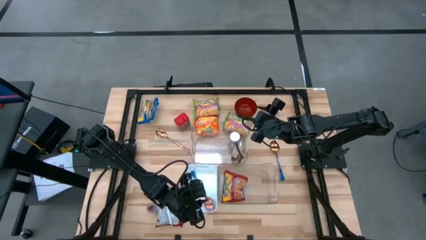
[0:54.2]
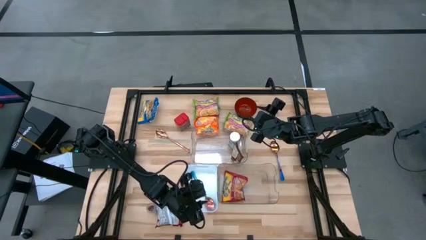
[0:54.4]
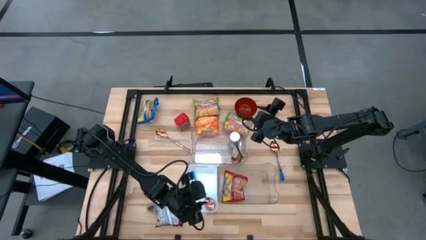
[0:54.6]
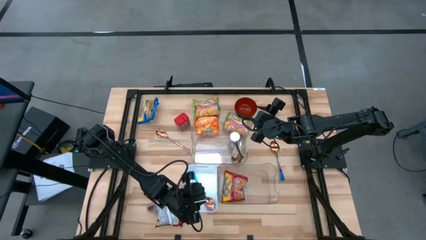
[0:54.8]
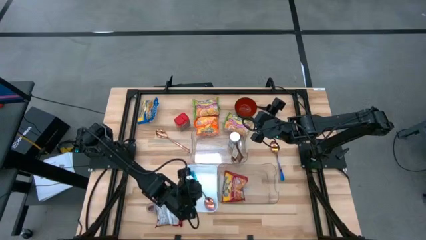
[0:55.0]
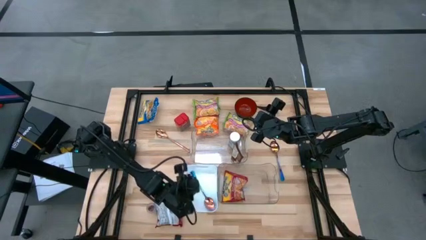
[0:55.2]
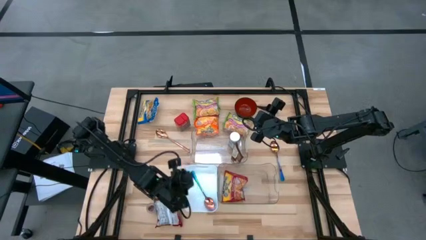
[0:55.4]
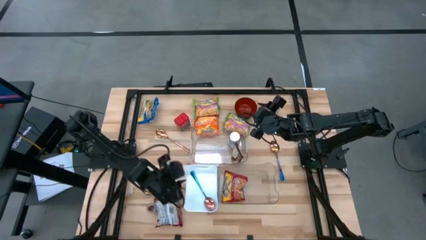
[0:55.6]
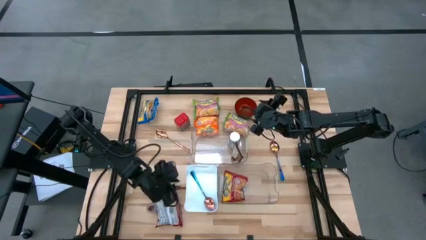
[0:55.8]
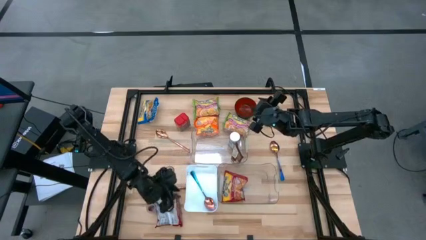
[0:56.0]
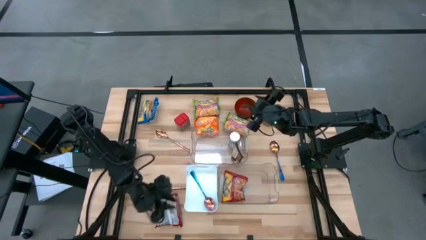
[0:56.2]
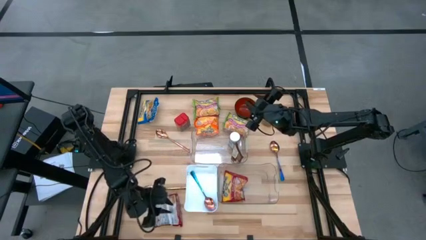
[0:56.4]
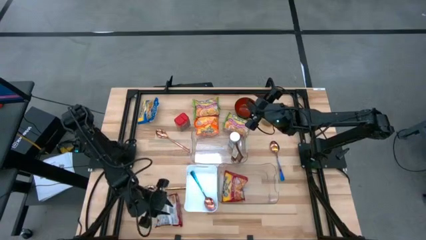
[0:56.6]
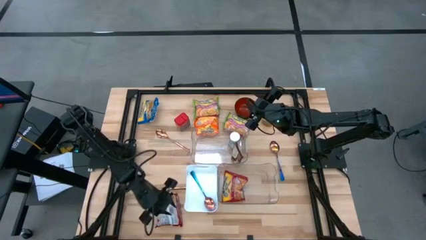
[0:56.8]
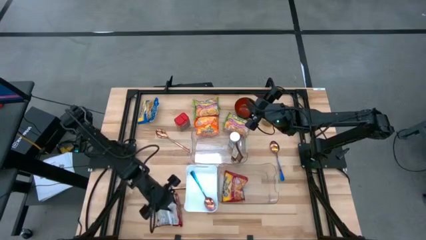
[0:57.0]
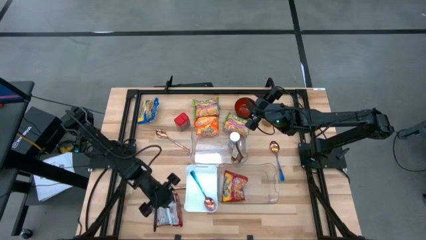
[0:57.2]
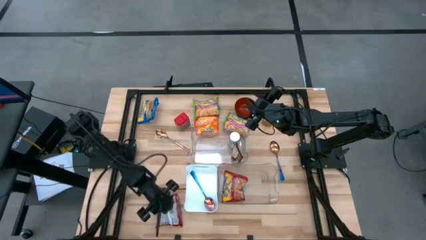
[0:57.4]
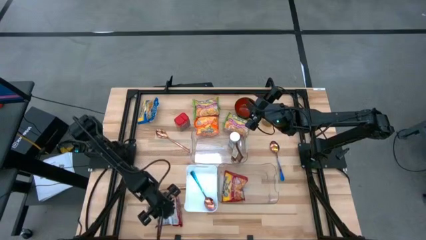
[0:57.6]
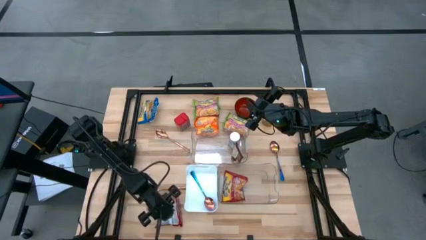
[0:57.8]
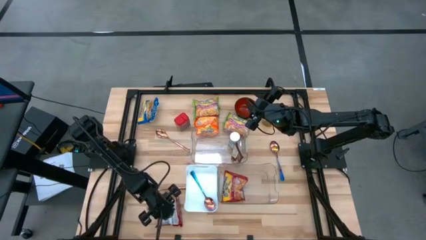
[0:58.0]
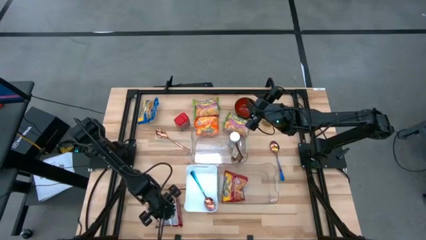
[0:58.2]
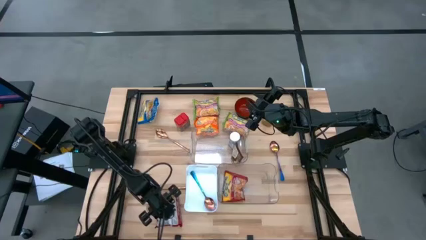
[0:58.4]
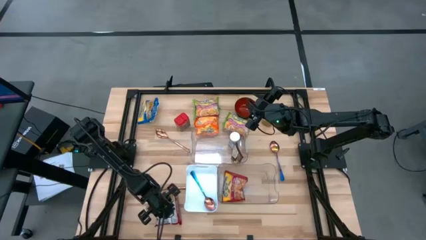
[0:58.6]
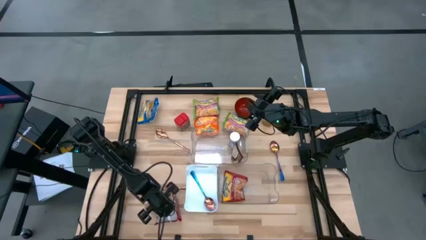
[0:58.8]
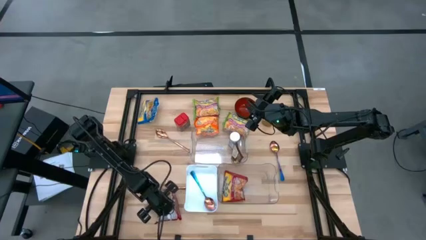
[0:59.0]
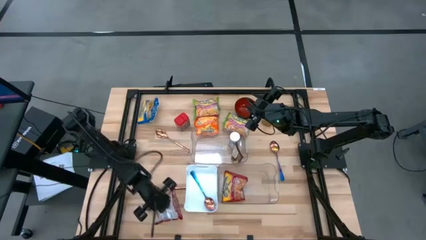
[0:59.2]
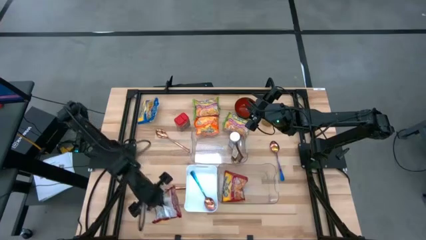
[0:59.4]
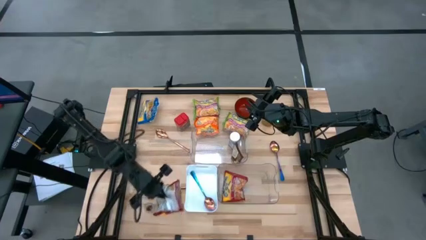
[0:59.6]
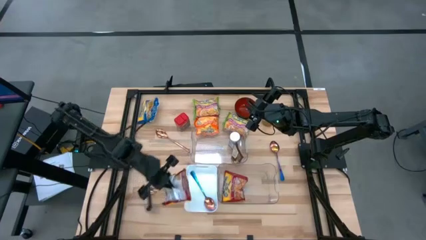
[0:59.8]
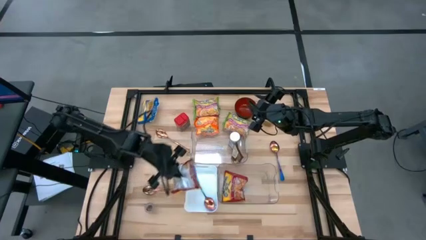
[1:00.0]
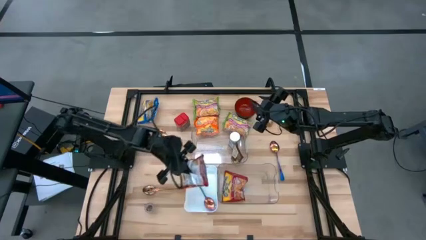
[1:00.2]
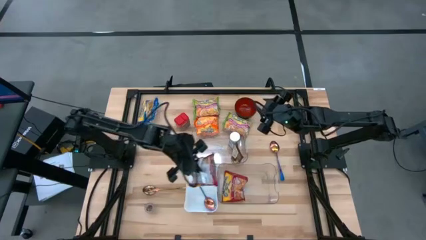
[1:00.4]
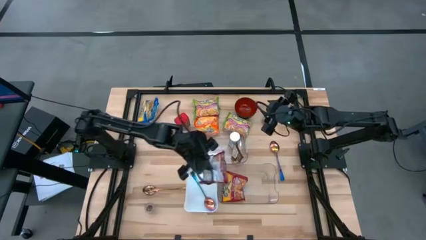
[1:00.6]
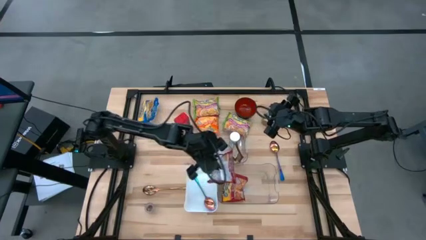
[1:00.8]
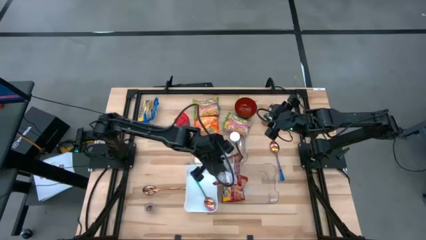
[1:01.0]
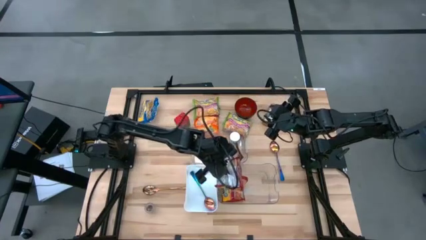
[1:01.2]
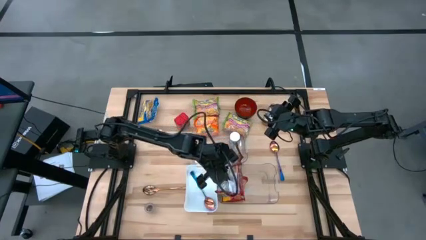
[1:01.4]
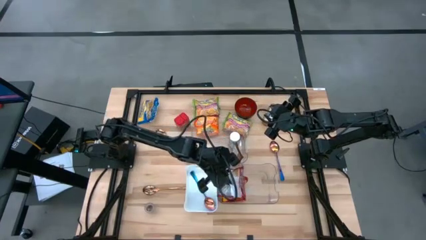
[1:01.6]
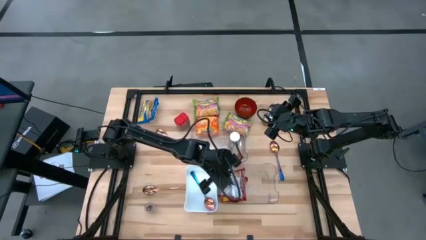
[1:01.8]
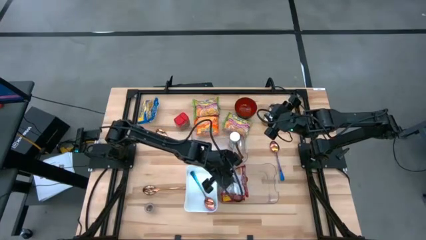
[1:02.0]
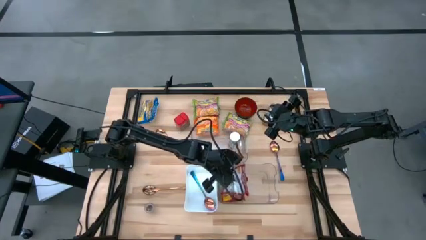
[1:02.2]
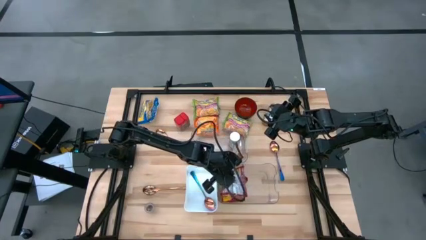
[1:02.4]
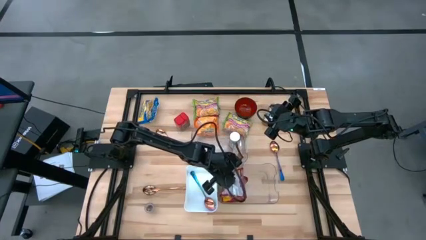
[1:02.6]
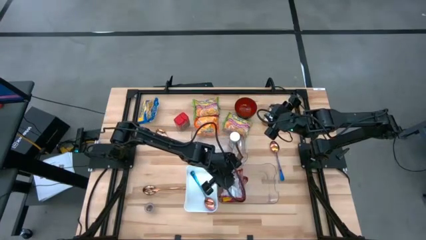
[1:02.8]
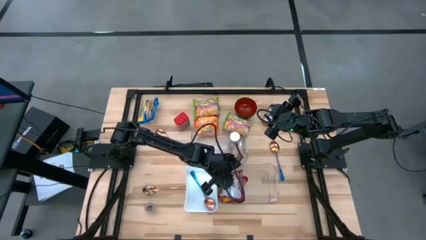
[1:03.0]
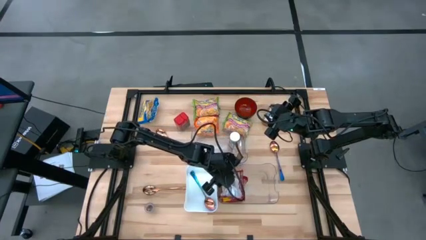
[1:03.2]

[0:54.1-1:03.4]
Task: Pick & Place Food Item
Put the red noodle pack into the bottom transparent bin

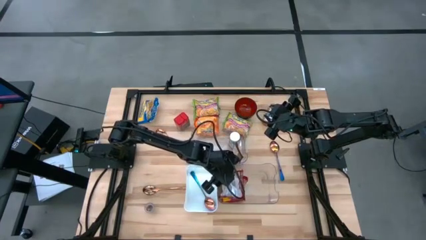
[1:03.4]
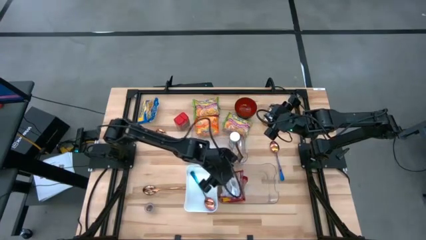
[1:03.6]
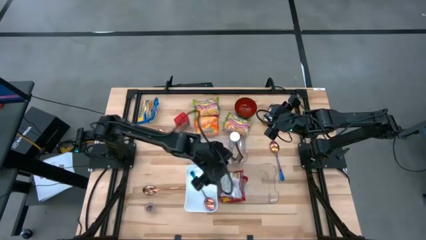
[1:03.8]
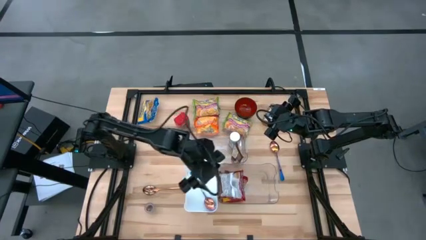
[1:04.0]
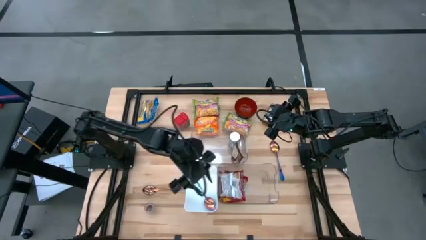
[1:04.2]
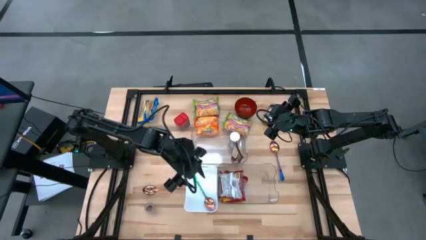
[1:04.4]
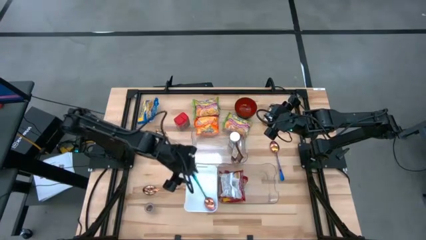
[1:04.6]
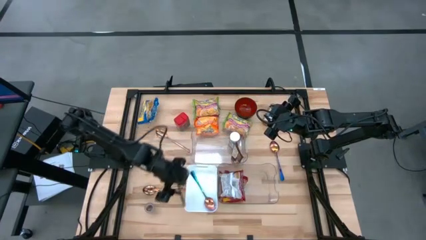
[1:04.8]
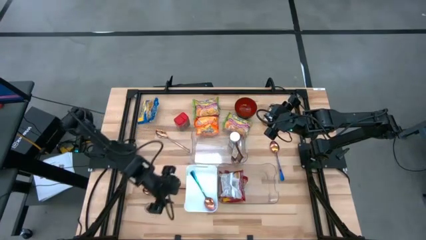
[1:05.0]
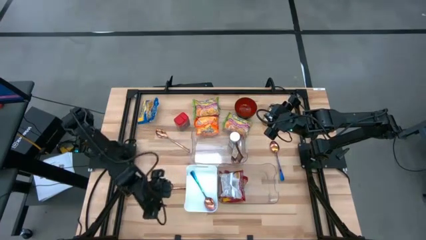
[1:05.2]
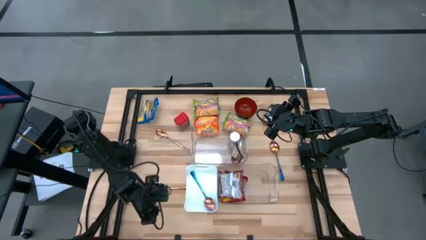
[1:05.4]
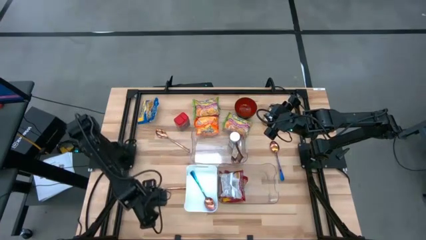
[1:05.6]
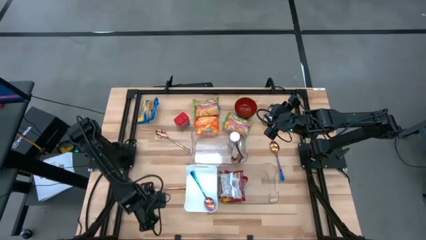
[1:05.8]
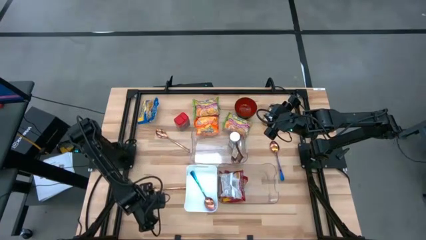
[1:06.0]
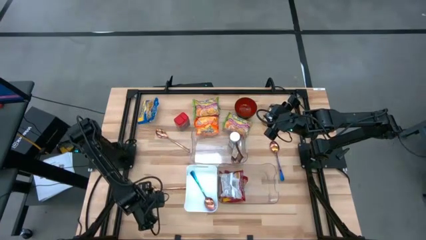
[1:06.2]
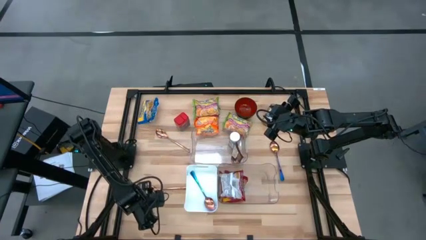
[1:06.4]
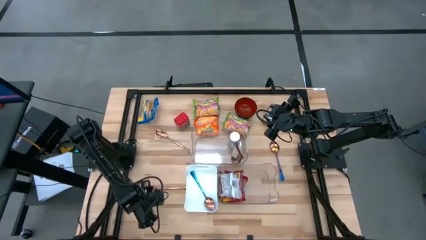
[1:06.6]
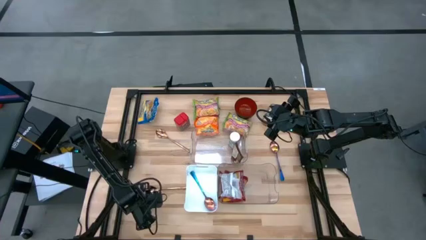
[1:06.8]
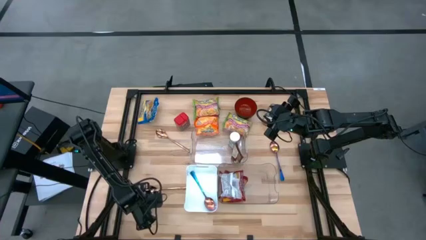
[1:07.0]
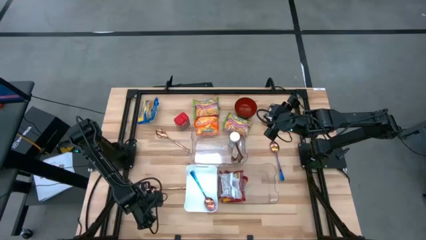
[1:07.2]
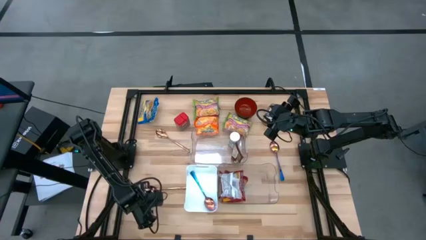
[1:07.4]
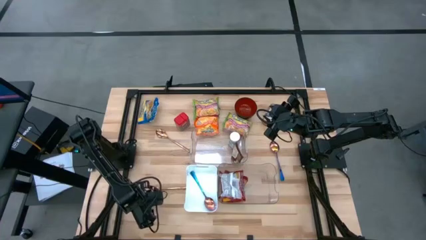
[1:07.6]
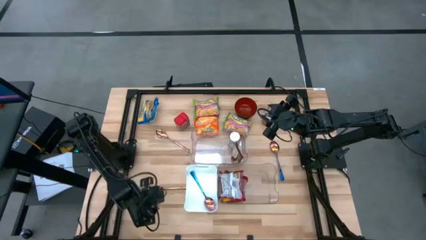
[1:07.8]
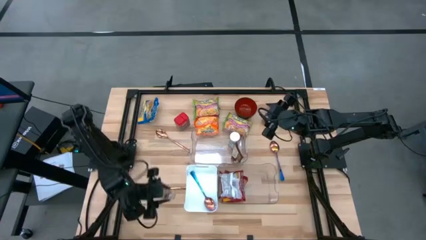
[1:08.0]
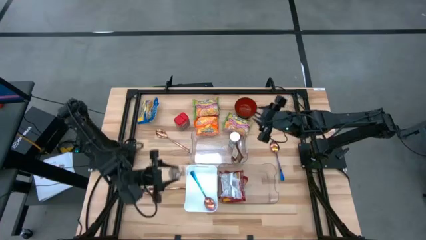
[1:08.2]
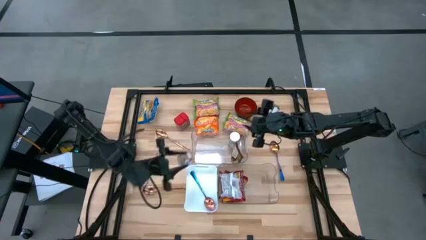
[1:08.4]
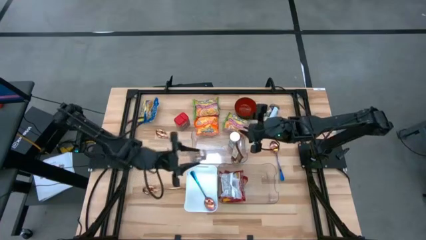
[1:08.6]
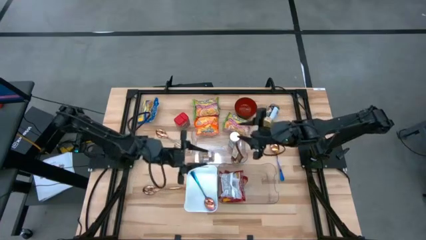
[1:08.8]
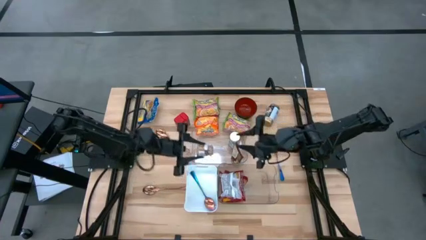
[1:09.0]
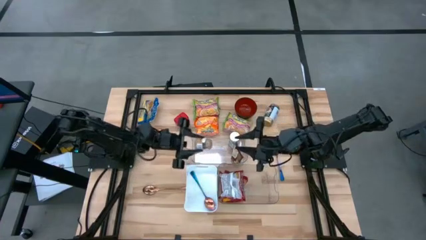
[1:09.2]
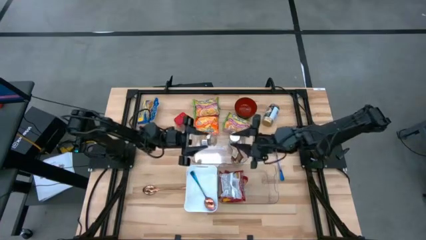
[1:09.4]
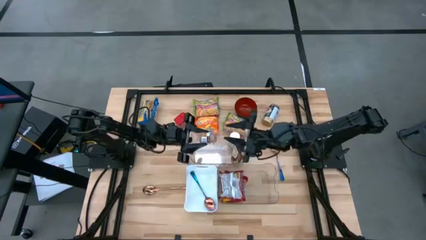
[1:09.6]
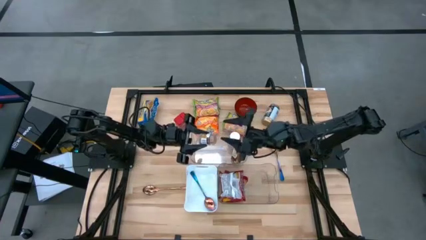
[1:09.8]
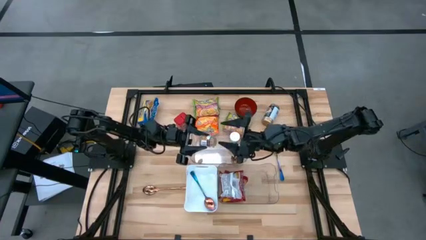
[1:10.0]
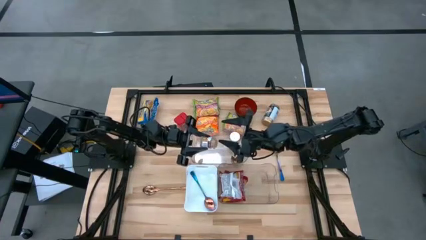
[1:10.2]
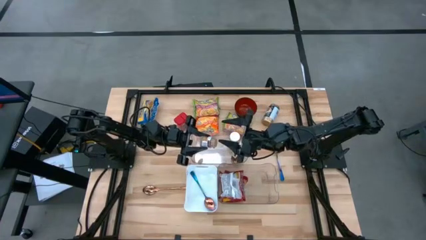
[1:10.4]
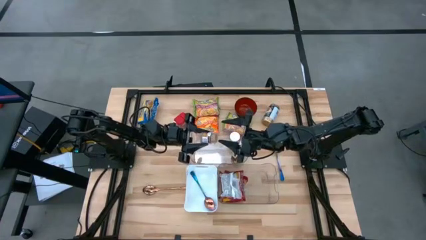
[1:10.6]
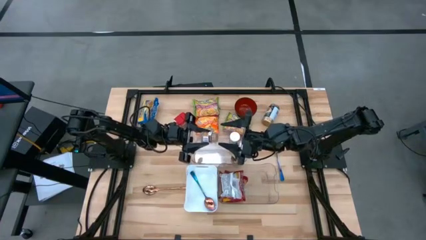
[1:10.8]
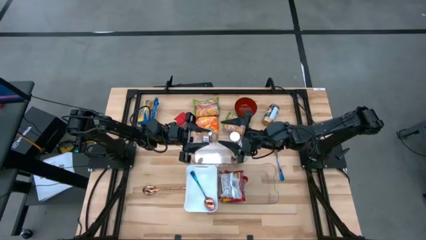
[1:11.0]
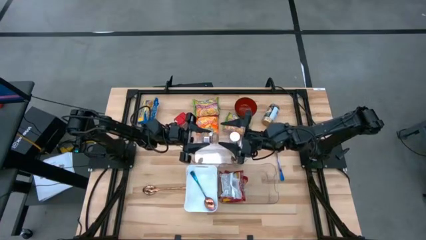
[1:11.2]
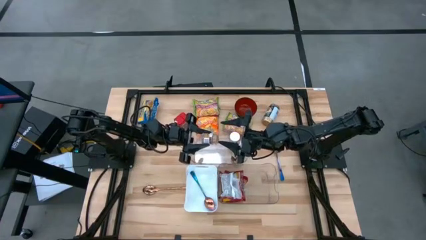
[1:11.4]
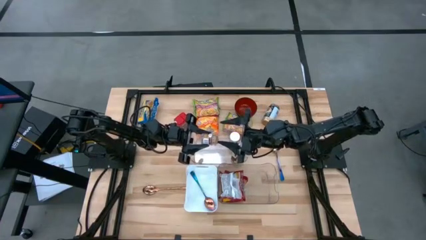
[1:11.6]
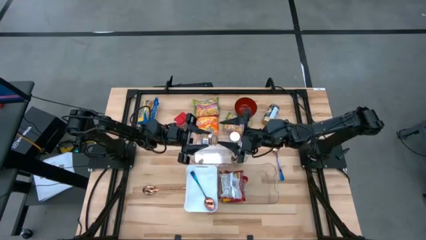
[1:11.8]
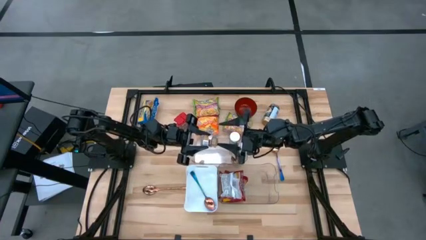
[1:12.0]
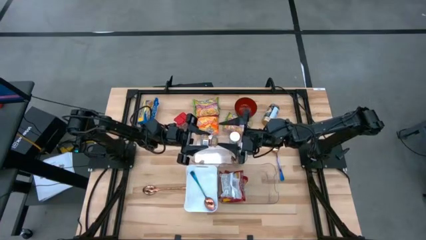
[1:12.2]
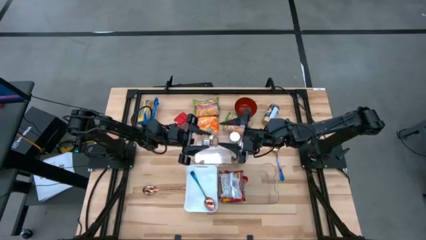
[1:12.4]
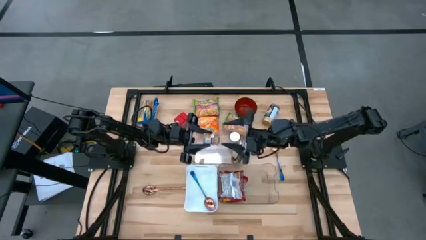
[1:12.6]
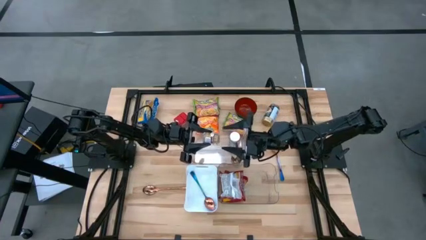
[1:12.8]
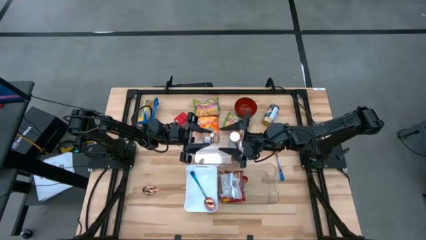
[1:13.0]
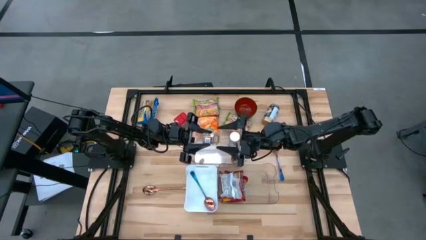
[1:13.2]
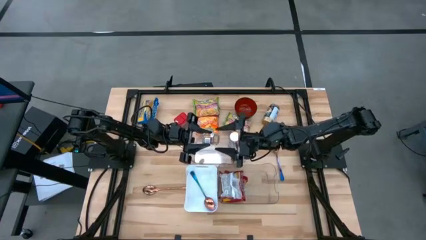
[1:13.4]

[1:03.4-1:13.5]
Put the brown spice bottle into the top transparent bin
